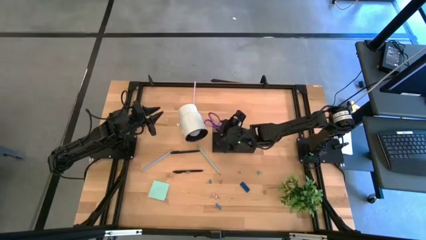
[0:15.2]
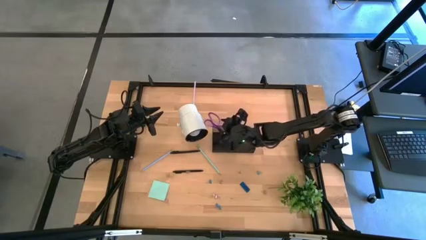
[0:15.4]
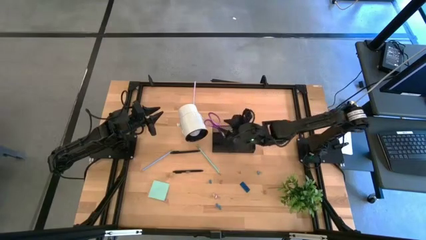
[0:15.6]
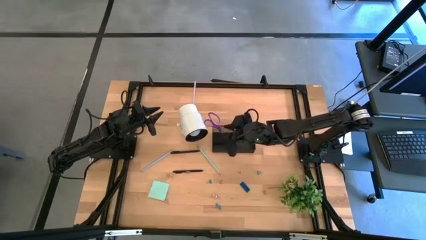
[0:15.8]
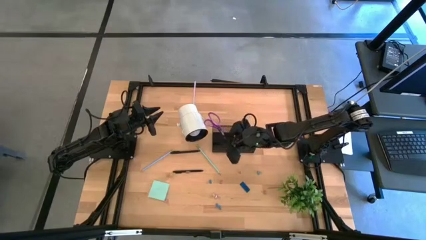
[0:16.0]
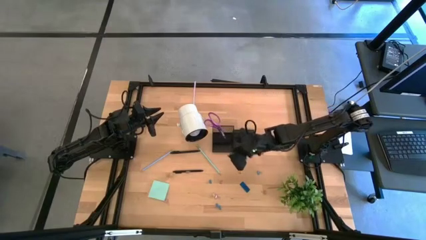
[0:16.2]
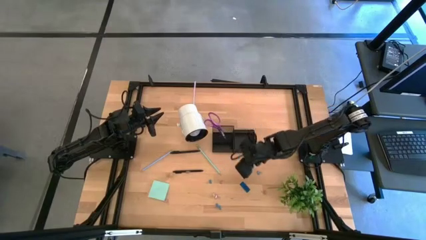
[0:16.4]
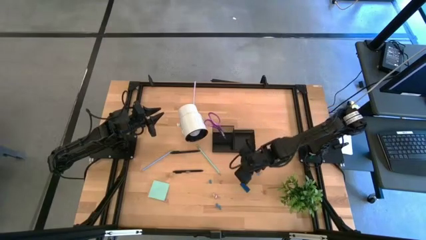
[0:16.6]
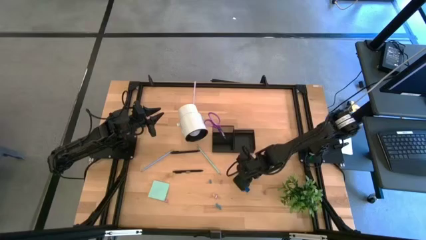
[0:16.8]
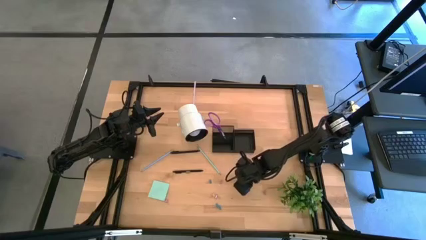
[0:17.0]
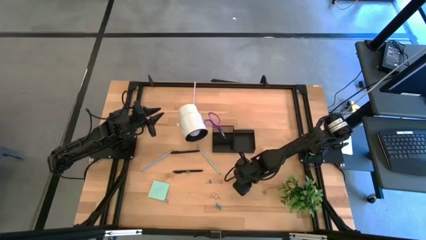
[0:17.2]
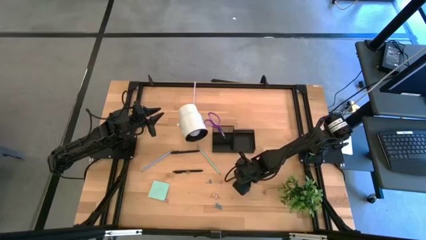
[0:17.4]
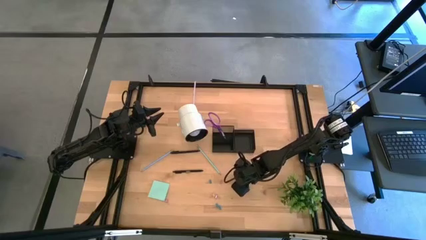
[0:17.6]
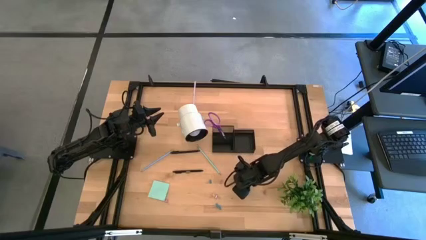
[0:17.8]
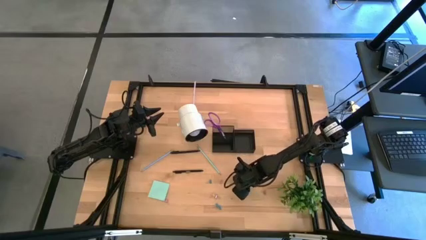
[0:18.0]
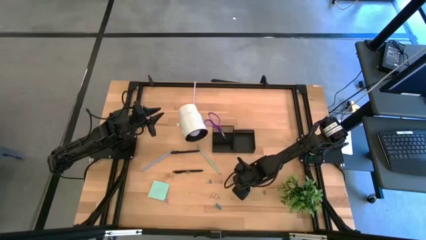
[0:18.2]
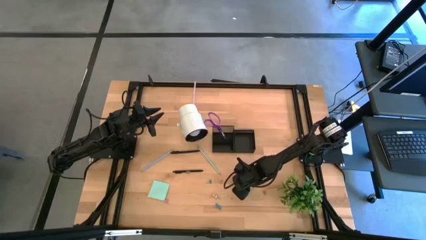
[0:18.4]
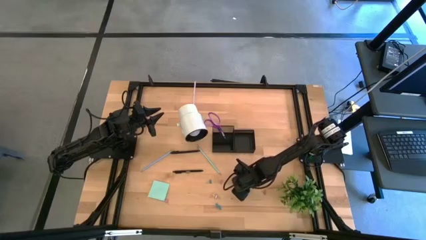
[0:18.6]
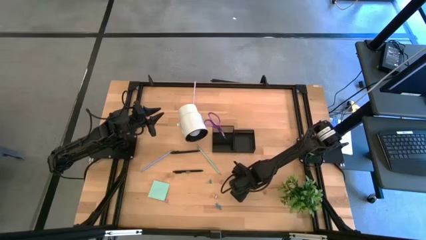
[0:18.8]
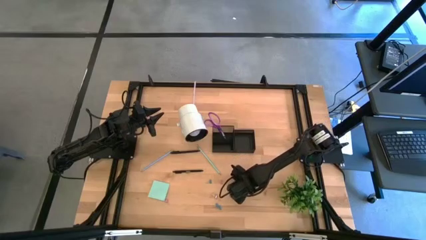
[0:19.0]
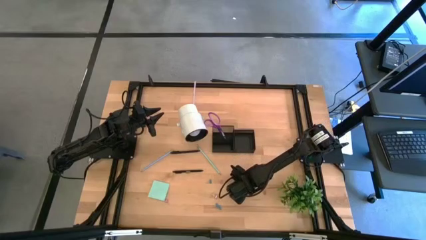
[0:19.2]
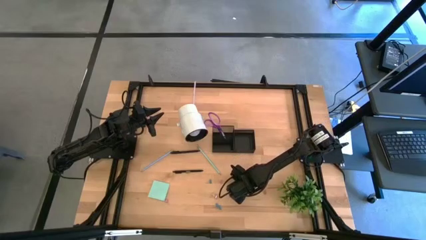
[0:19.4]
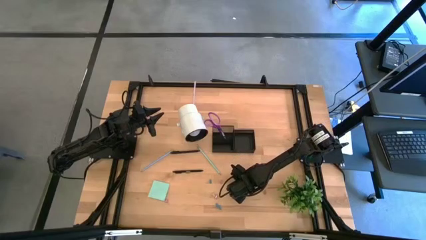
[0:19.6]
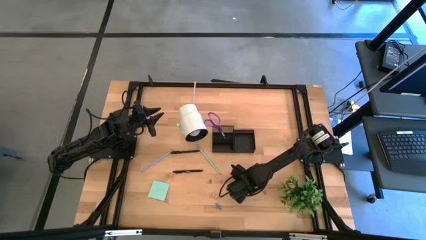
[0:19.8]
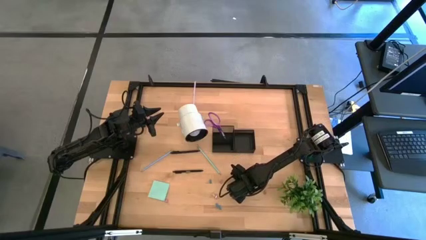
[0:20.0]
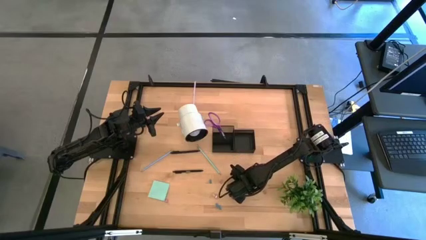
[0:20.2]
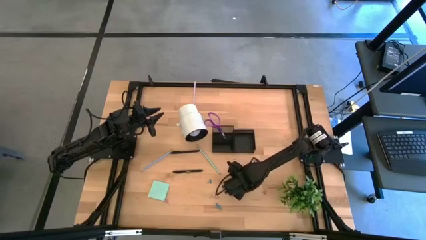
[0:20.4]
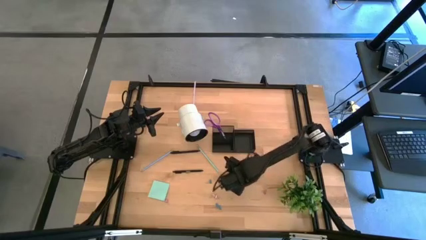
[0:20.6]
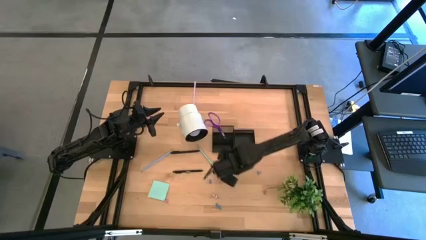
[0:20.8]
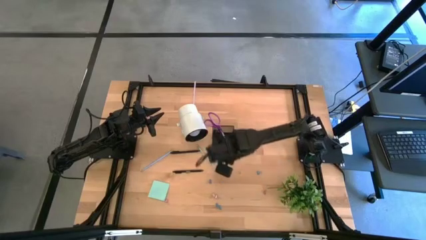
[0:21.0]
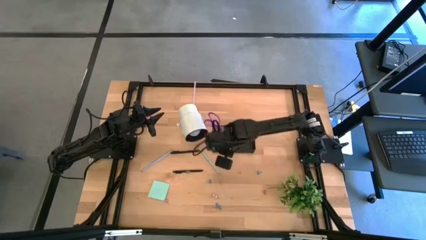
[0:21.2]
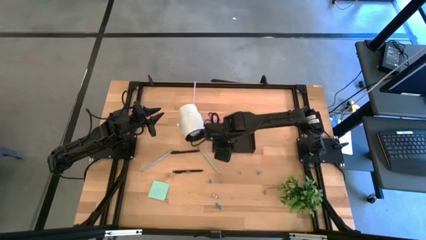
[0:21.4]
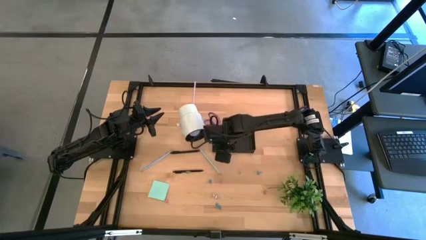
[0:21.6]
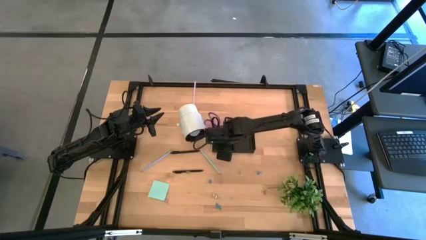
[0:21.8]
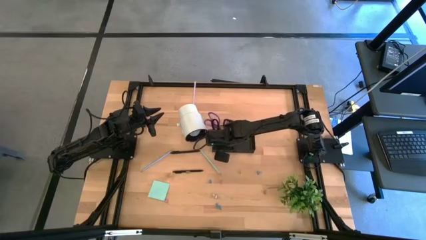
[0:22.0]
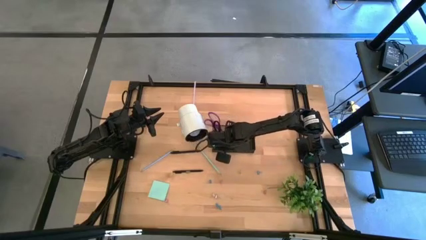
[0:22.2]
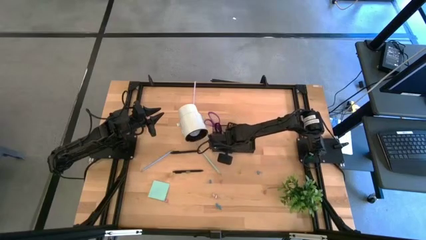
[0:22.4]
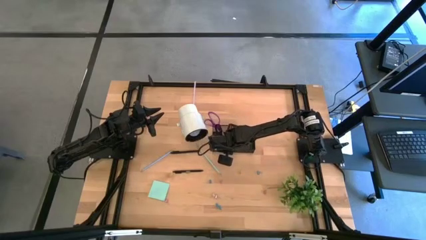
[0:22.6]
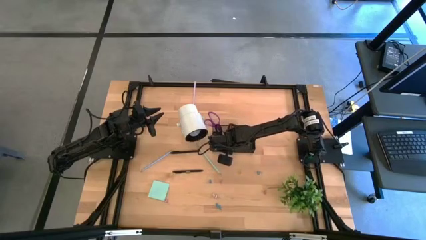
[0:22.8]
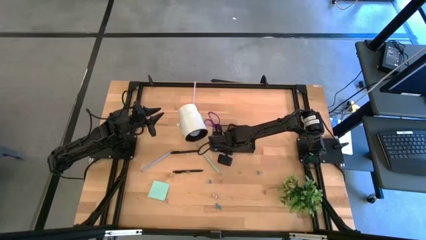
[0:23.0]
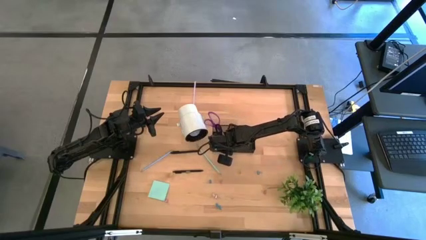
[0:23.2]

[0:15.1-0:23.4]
Task: Pick and place office supplies into organizer
Put the blue eraser into the black desk organizer

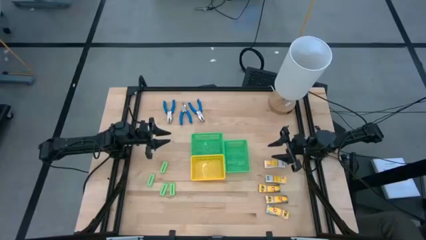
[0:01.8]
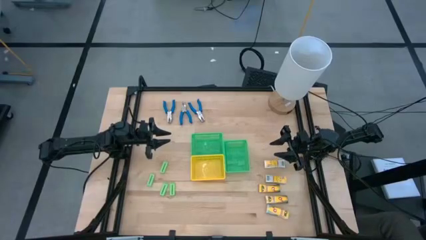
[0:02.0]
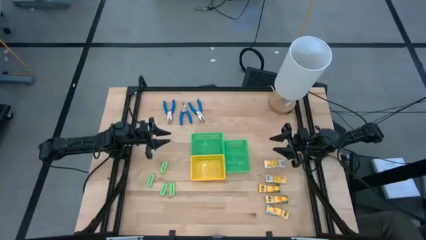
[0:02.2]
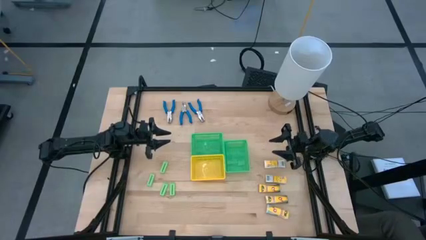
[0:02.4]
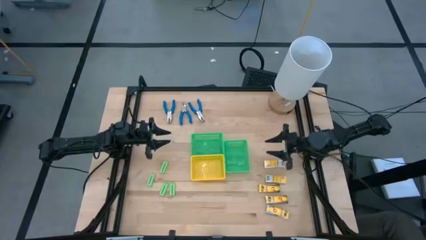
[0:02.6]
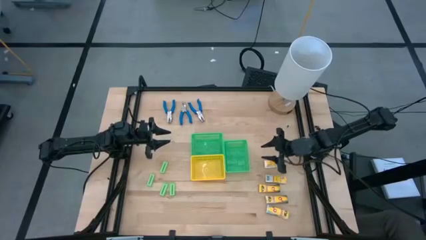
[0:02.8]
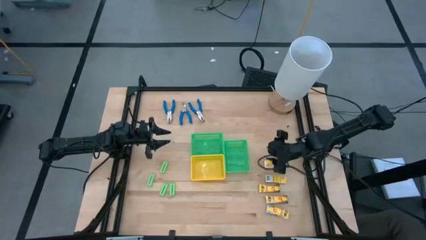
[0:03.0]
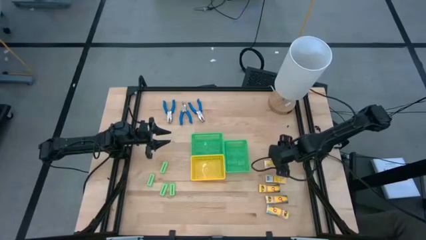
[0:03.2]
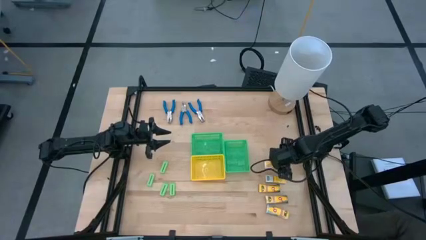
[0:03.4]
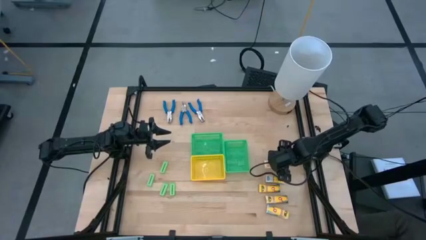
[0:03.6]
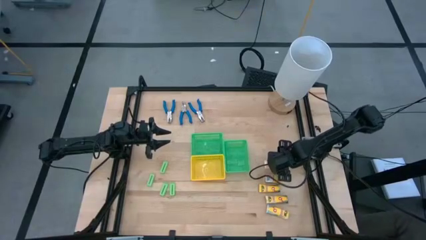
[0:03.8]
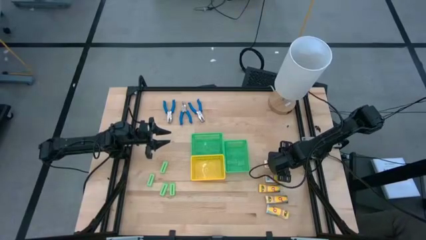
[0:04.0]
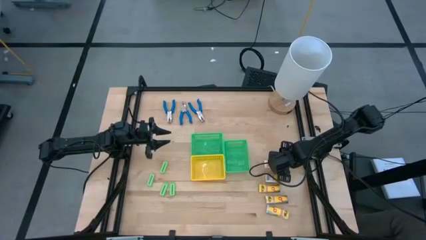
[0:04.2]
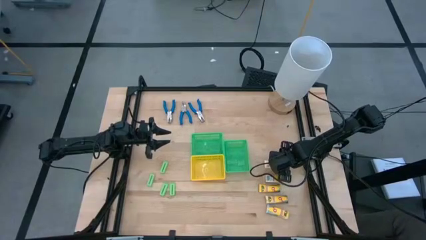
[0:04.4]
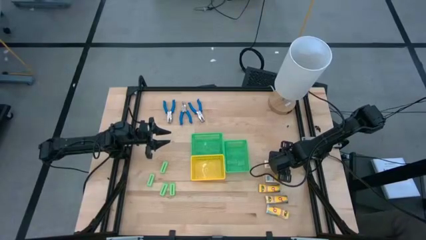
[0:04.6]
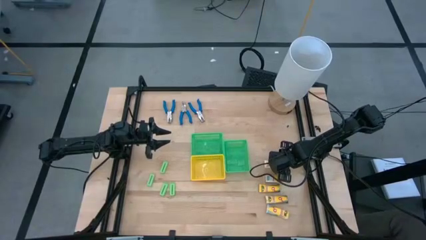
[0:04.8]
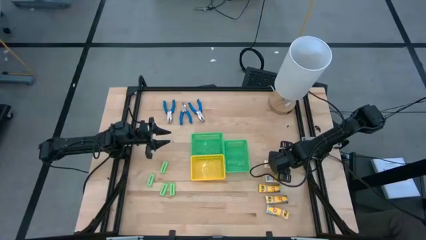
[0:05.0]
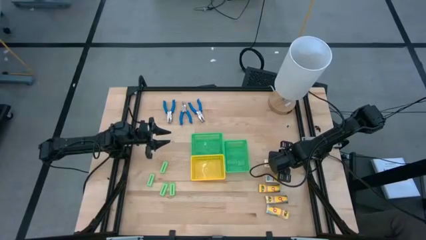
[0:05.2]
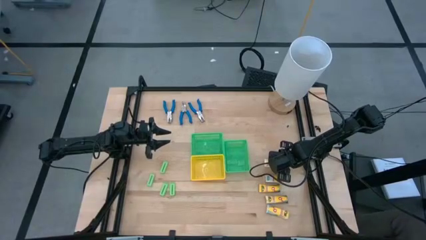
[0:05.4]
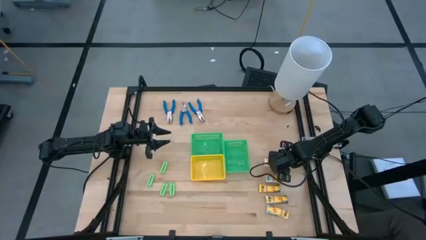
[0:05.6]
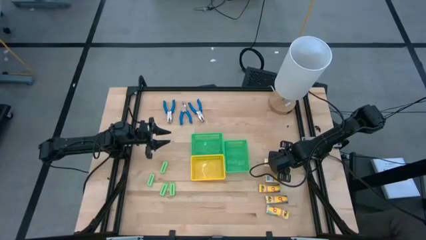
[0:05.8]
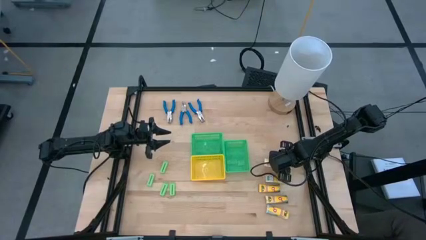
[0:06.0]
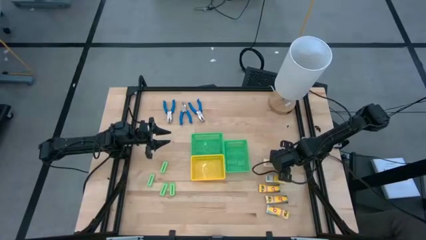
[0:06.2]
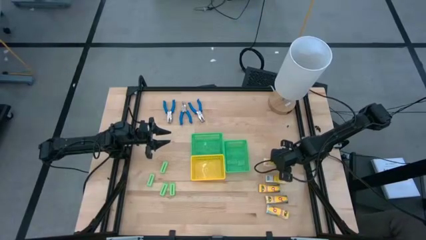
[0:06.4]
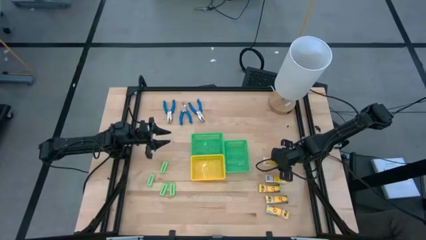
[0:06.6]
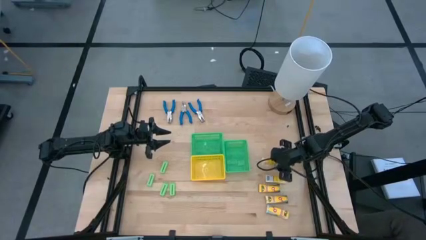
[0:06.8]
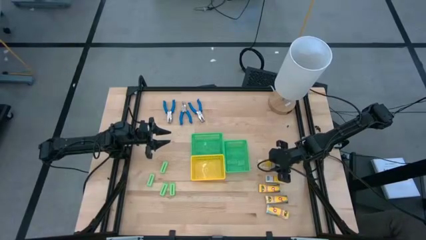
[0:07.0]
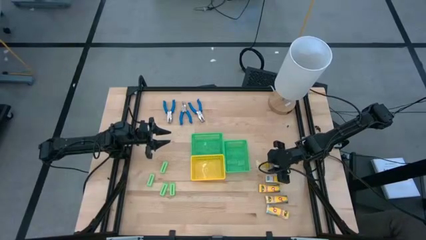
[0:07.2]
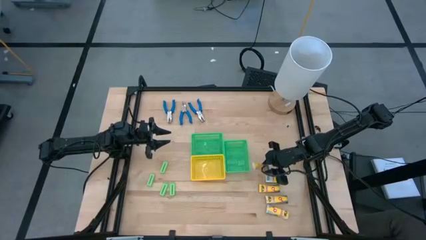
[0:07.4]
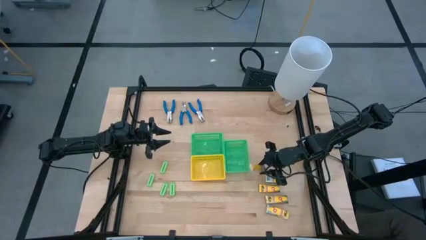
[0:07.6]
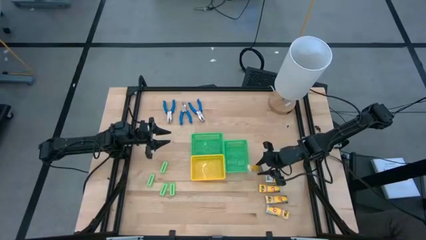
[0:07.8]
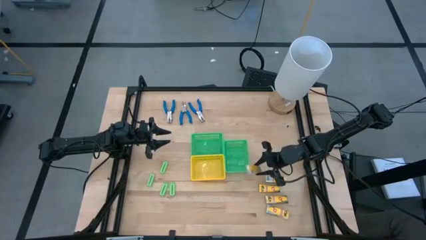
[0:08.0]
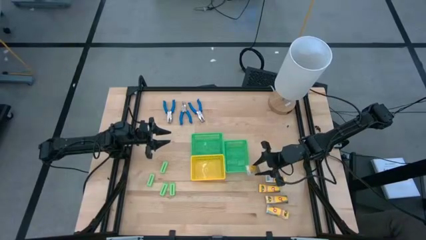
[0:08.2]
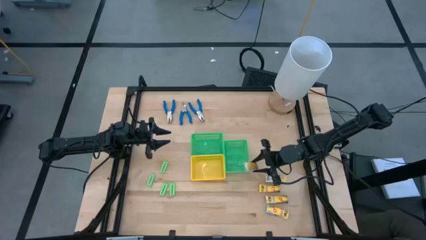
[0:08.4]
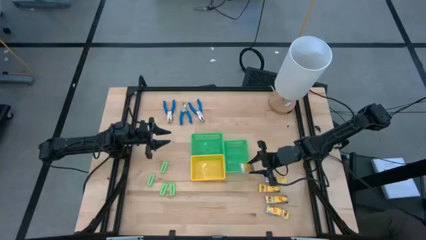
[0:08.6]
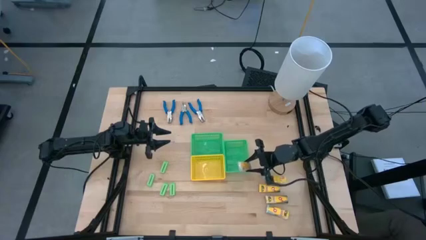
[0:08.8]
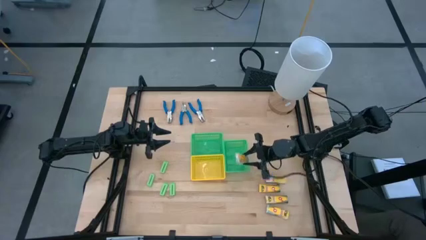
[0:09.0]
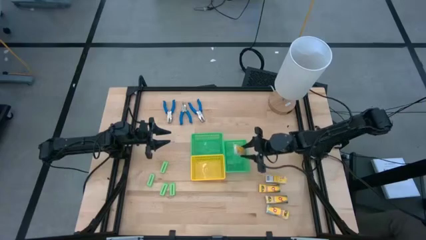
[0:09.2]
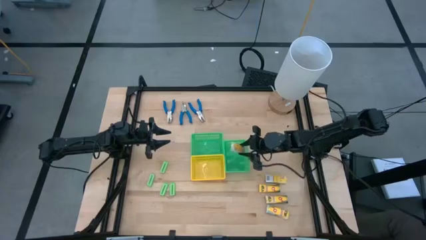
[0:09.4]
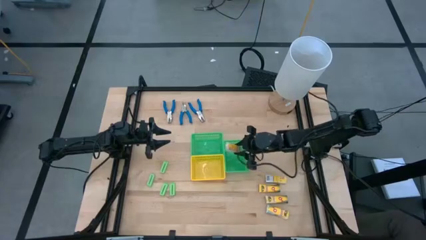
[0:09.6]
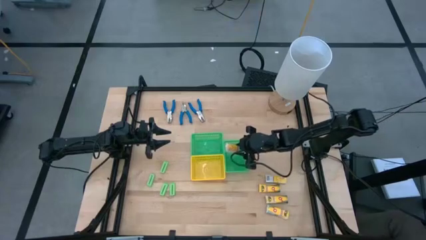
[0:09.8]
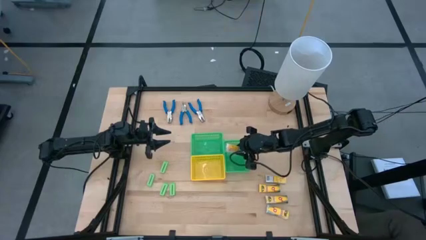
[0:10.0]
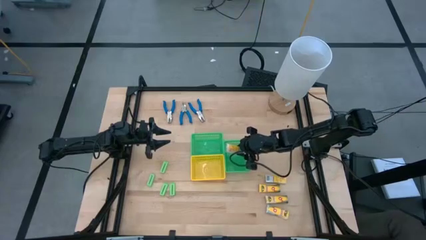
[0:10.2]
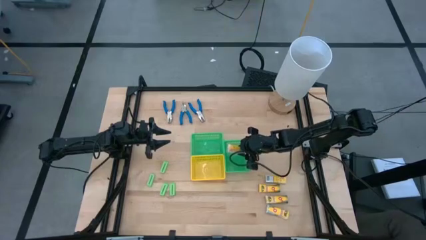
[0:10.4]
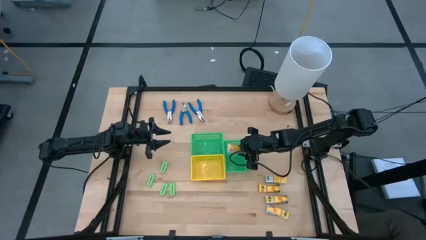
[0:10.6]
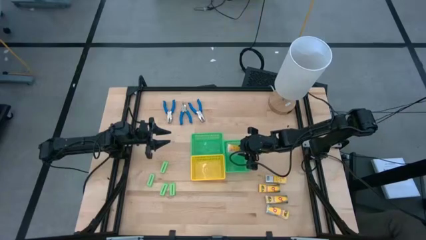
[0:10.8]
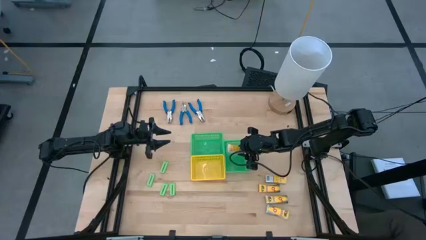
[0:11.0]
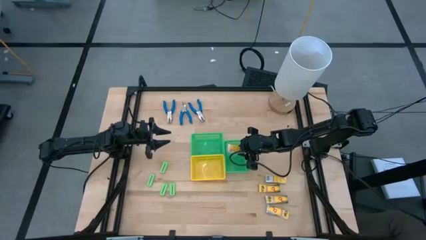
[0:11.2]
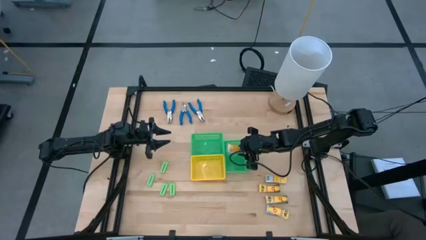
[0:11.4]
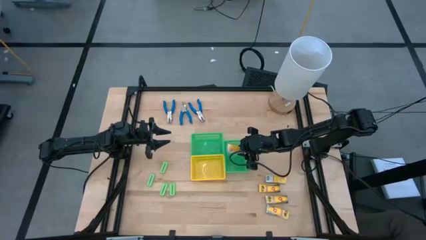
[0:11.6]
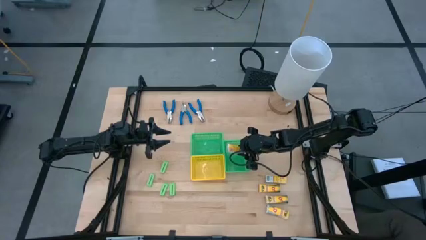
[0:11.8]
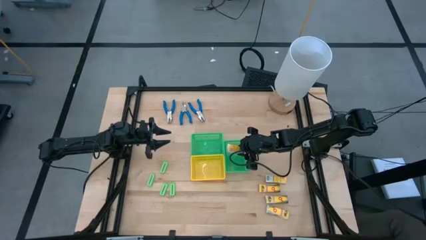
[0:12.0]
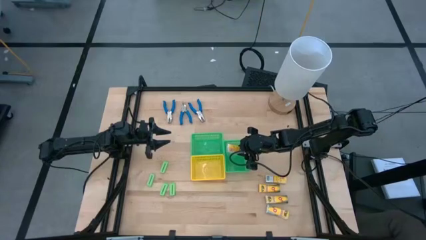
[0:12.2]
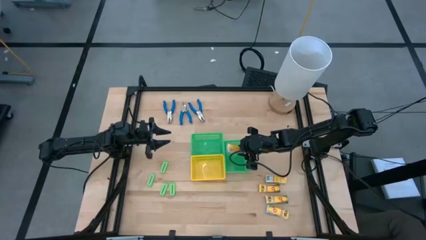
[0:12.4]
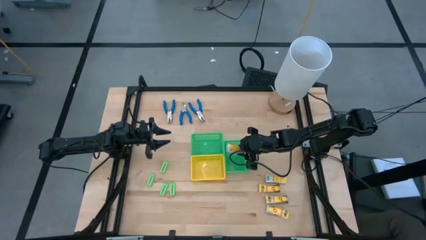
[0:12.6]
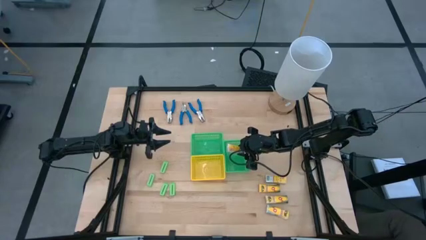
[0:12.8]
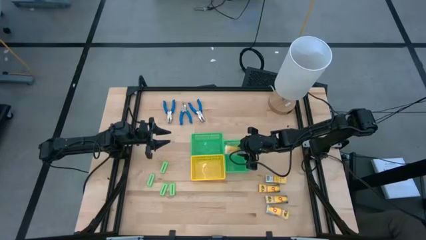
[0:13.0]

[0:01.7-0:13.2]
Task: Pick & Place School Supplies
Put the yellow crayon box into the right green bin
